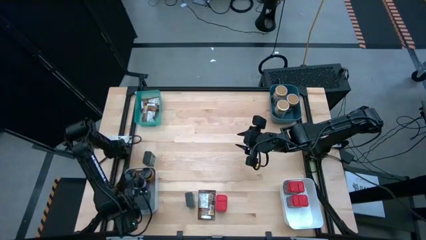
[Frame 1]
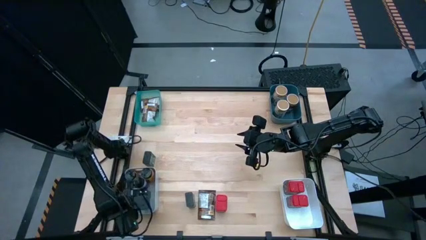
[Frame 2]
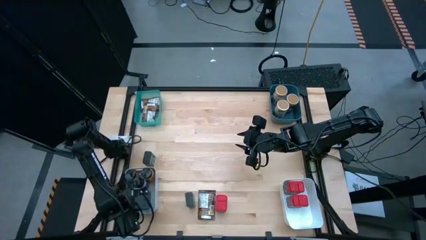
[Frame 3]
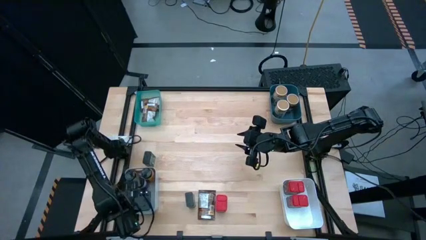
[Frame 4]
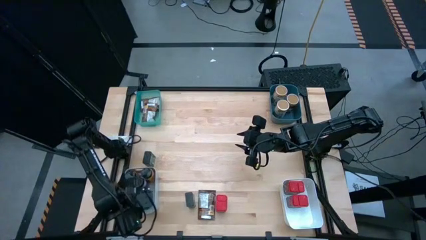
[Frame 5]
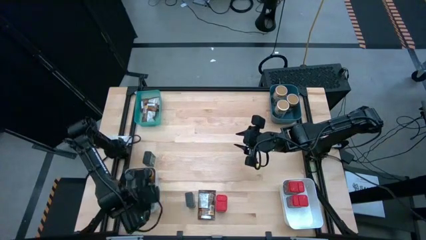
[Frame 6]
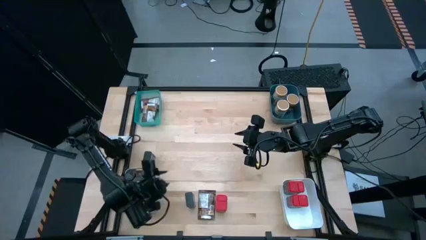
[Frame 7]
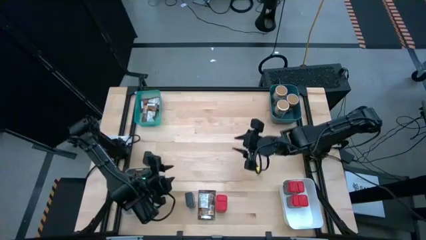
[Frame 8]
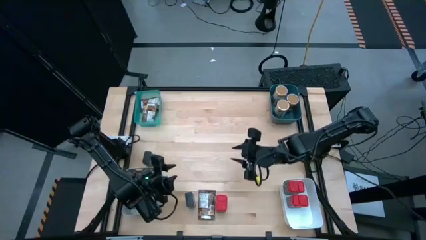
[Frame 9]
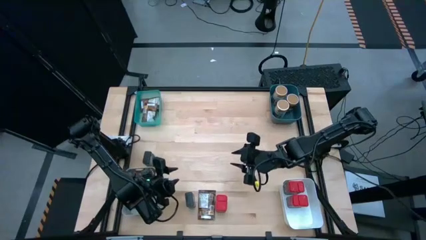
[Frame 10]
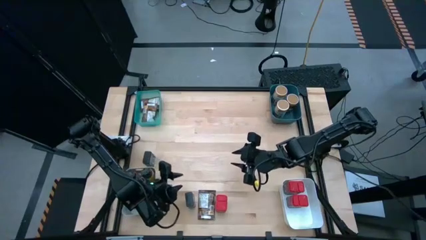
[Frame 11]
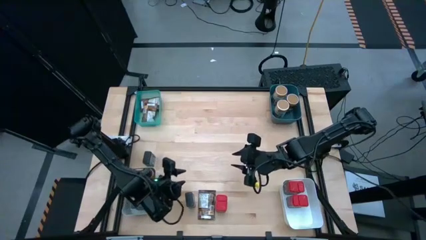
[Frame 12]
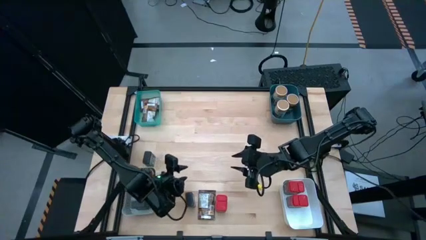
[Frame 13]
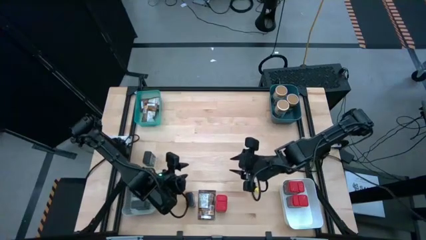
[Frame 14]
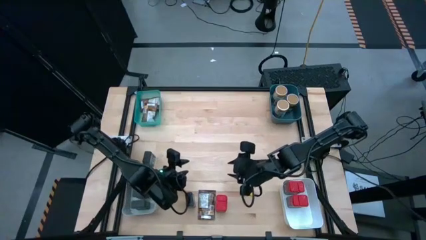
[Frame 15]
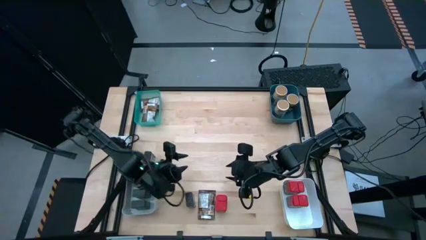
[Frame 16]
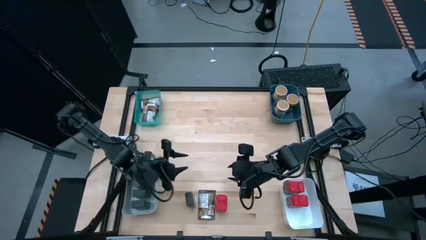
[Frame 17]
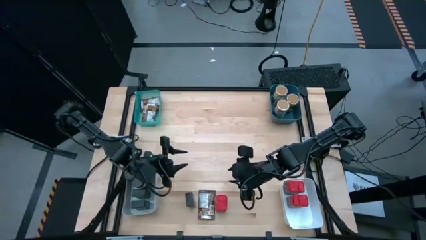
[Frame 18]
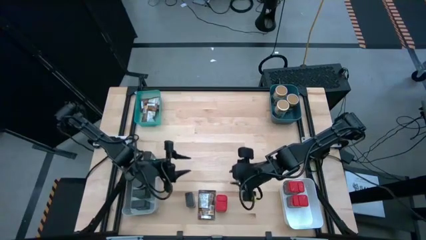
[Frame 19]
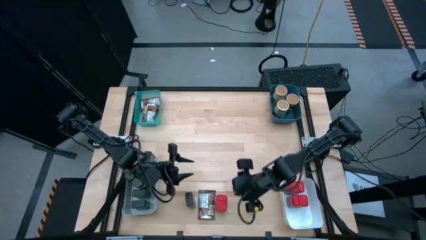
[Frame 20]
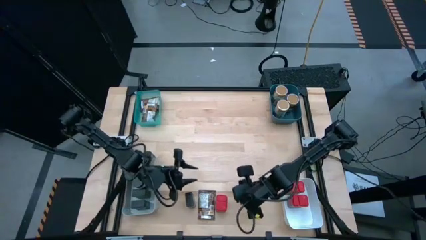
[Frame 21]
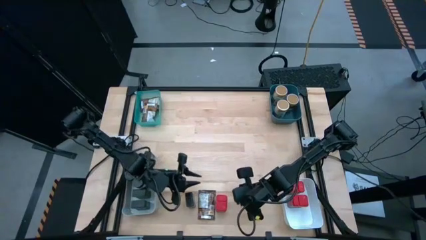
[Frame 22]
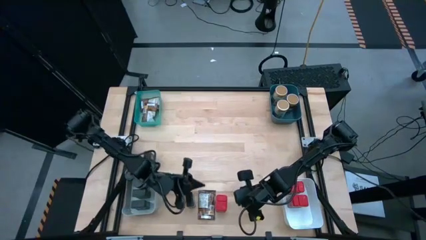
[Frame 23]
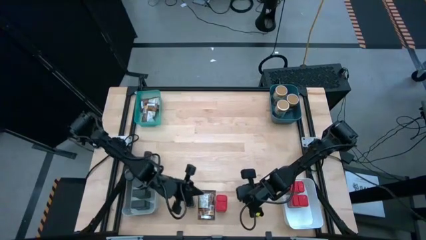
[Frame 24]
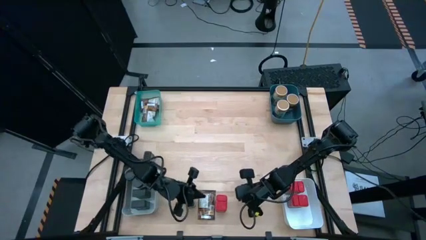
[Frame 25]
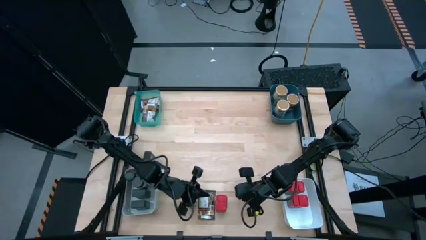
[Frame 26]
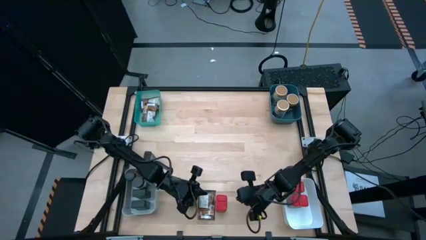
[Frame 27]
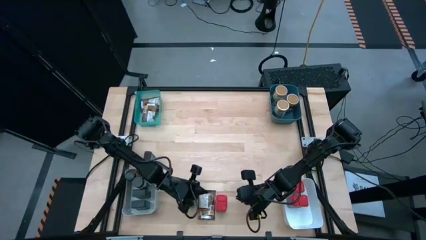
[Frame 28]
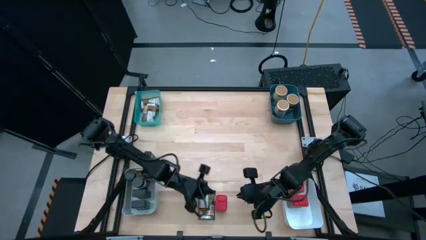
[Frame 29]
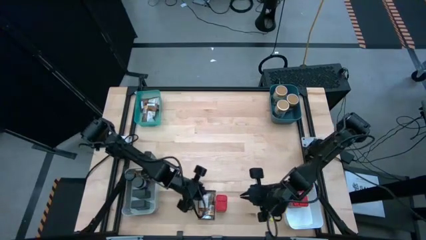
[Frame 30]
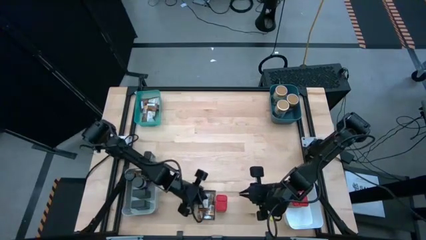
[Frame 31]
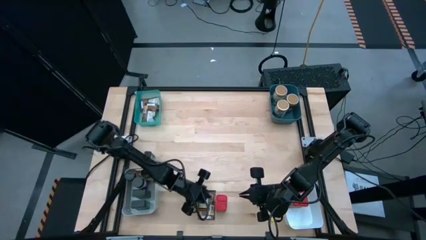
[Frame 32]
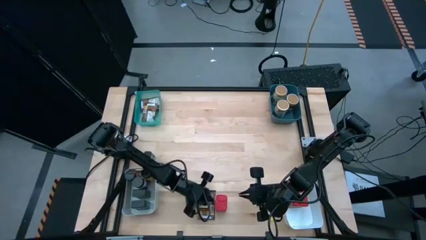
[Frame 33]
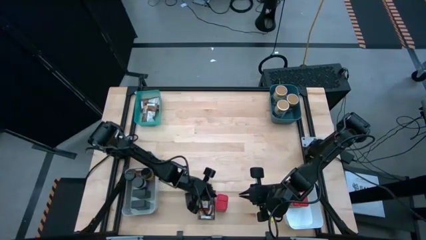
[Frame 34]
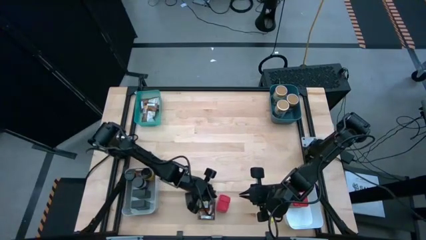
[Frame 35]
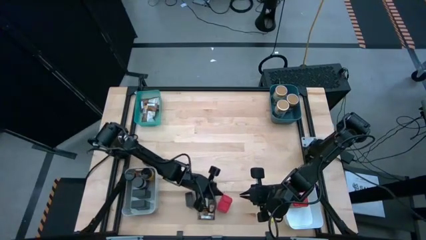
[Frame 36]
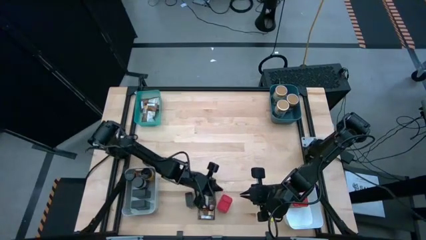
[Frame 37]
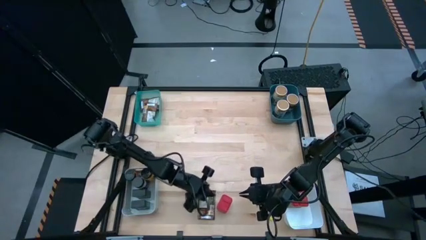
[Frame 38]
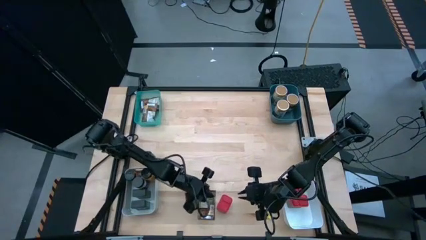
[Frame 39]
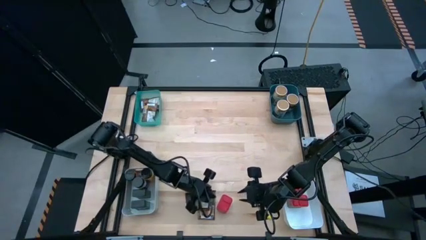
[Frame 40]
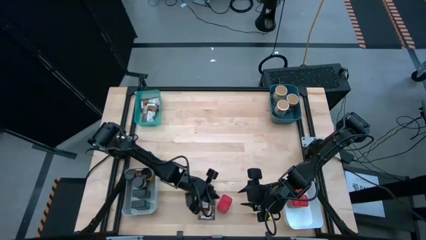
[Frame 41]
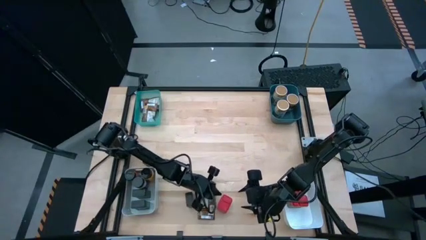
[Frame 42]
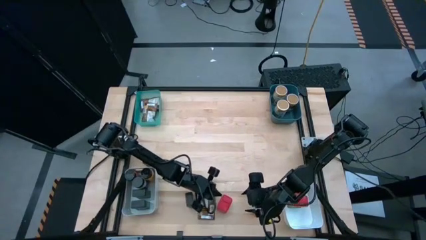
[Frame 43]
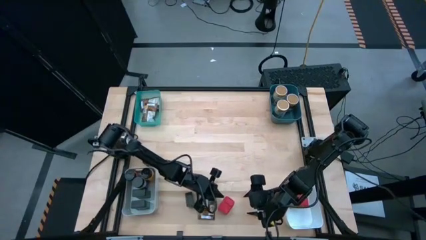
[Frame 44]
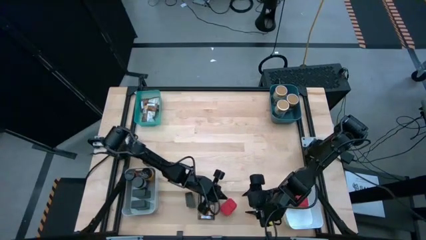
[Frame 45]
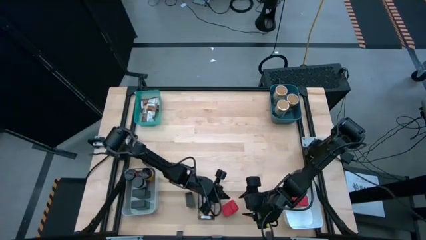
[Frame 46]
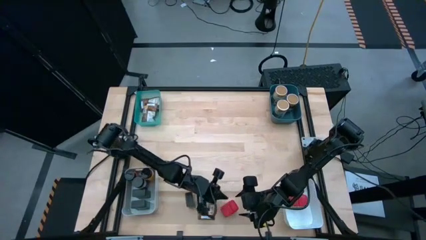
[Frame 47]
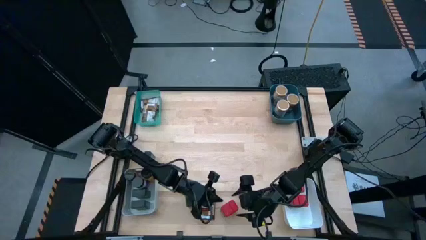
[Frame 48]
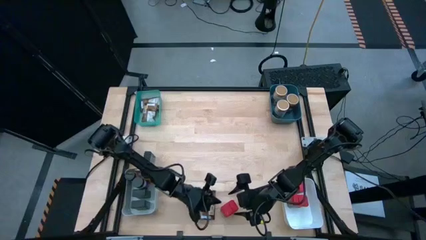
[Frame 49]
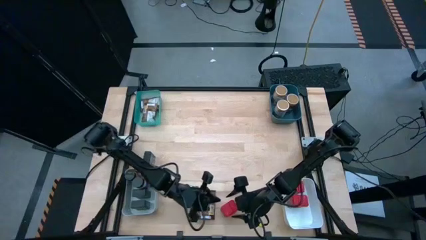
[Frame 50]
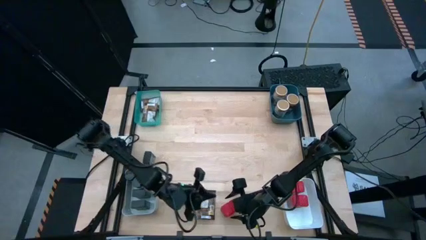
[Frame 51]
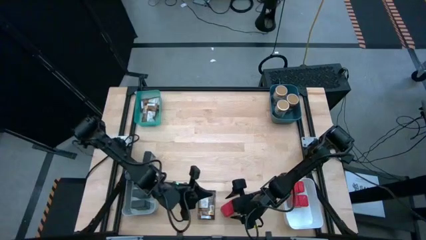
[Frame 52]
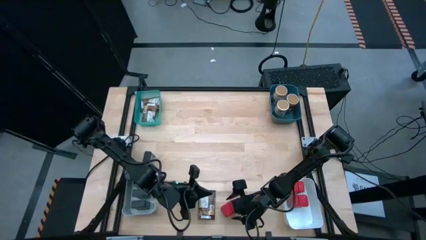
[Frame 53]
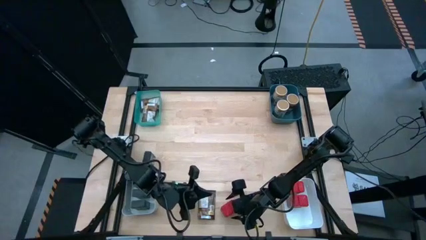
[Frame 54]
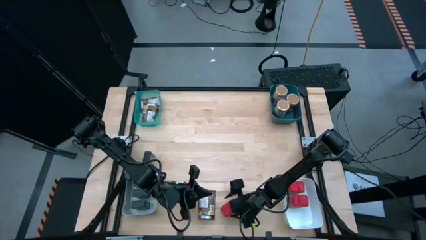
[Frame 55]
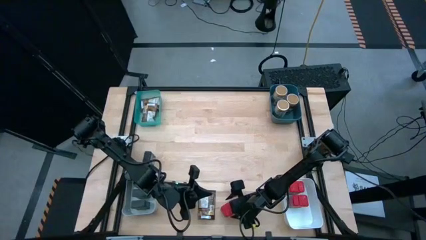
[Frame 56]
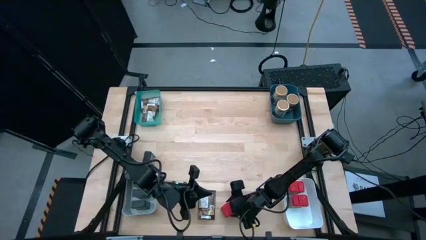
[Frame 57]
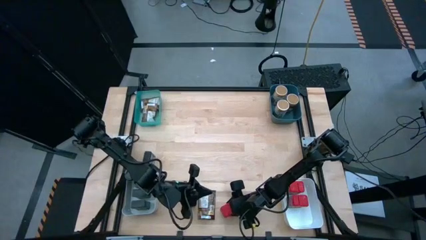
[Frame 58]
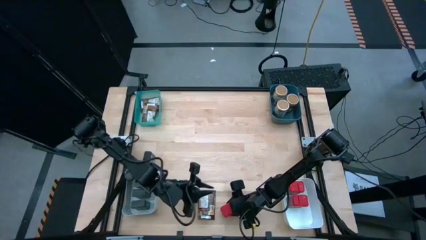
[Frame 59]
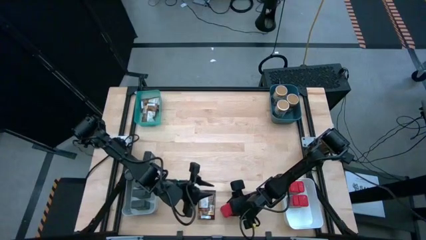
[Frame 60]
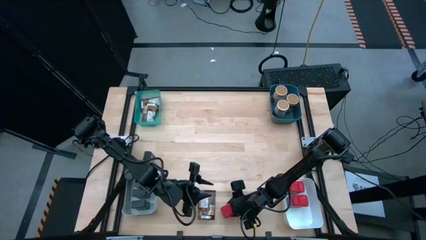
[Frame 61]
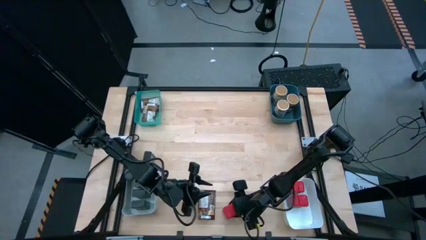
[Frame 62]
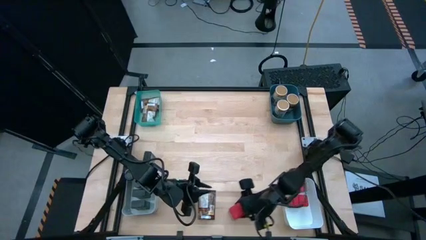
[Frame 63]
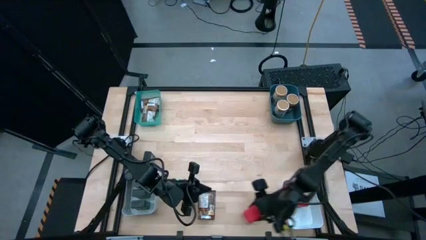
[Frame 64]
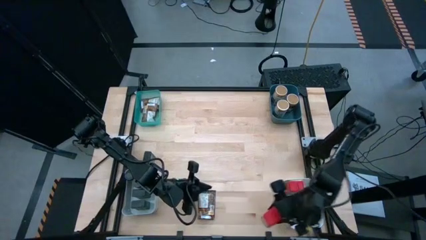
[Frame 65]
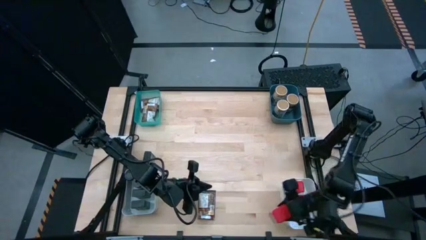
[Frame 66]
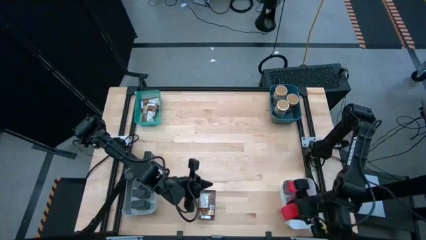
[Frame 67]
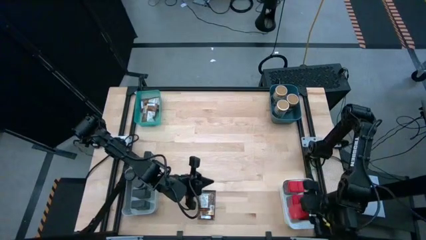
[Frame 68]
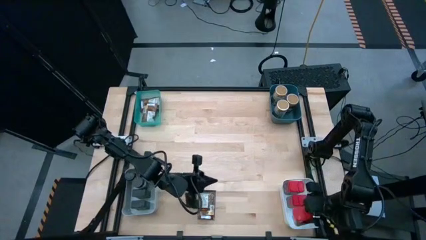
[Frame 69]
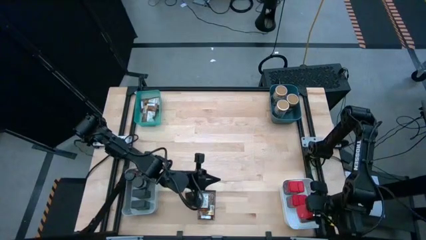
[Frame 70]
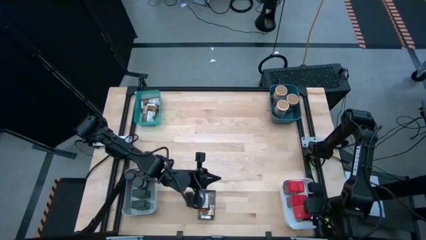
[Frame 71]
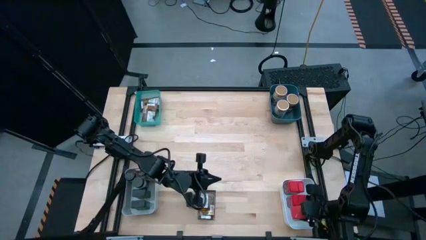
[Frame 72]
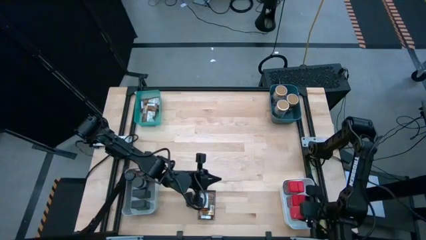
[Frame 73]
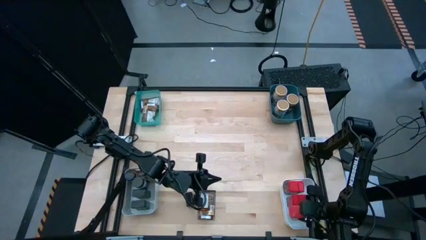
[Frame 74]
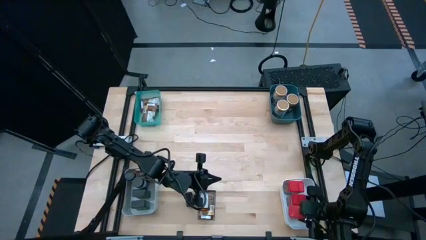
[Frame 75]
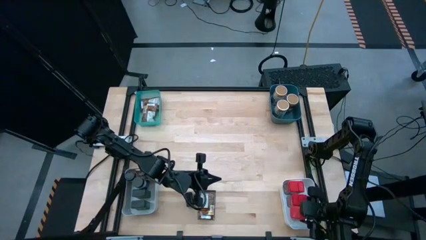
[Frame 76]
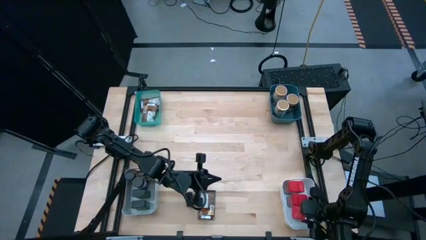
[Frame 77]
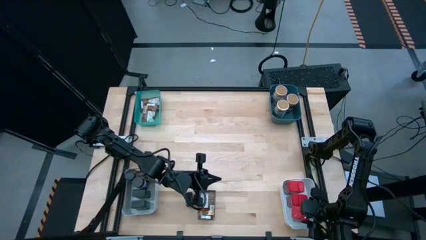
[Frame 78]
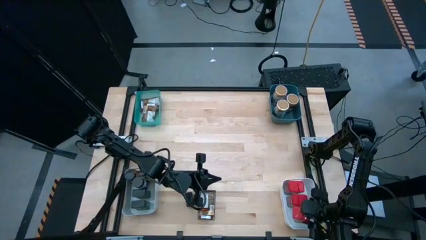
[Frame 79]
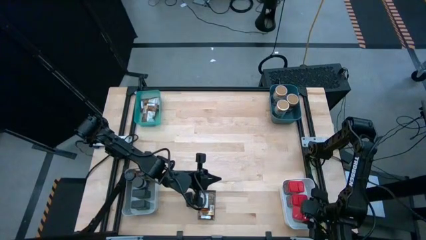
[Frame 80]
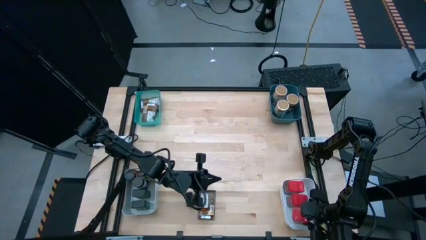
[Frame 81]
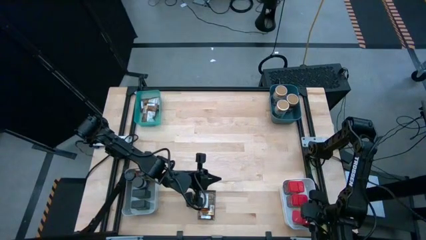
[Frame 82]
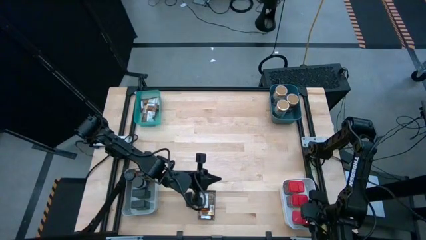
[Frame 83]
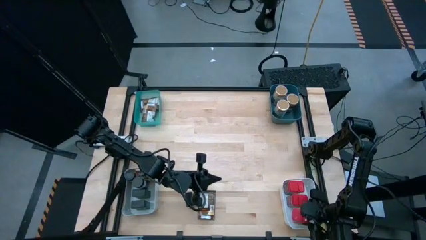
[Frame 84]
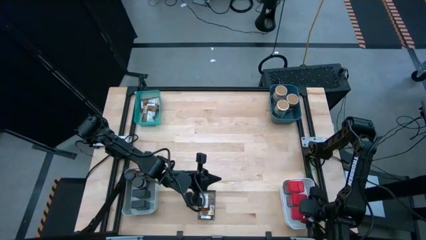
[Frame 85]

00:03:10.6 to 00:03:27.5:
Task: Sort spices by type
Put the red seasoning can into the white bin
